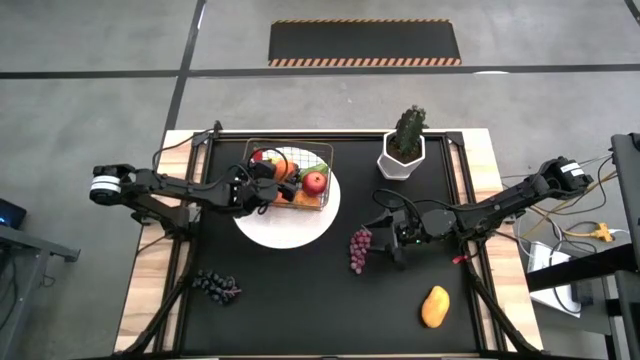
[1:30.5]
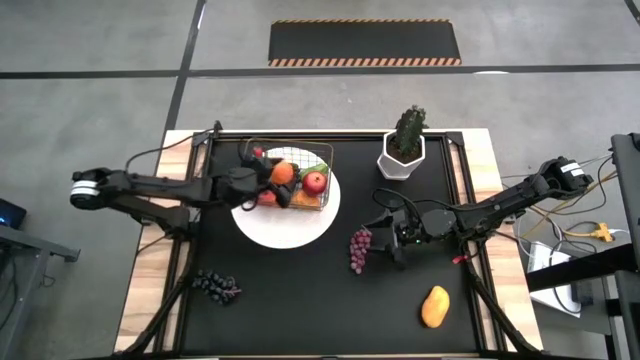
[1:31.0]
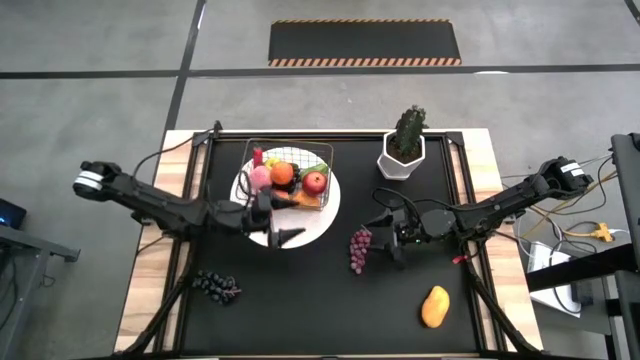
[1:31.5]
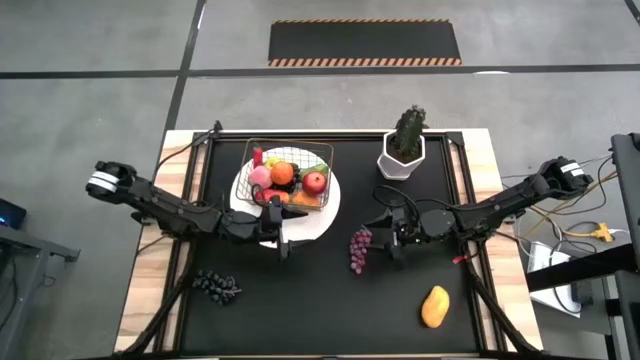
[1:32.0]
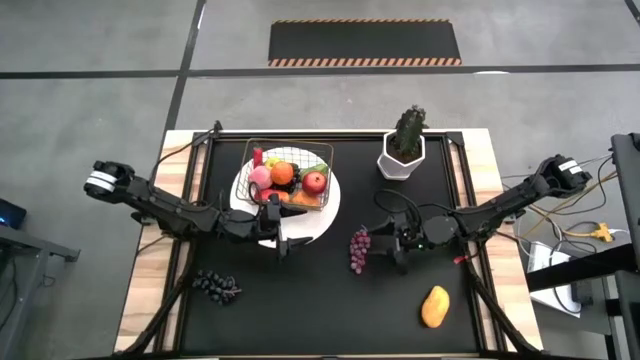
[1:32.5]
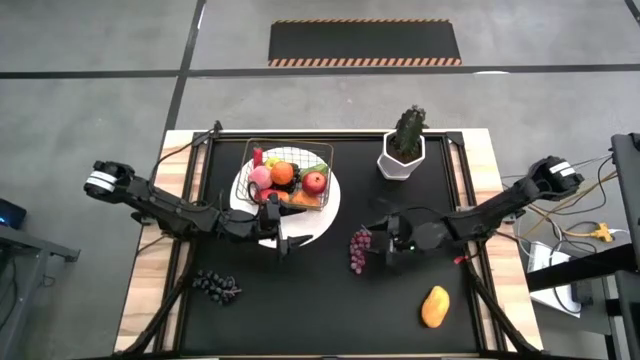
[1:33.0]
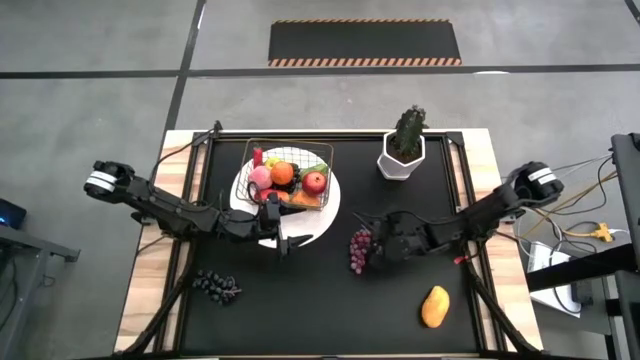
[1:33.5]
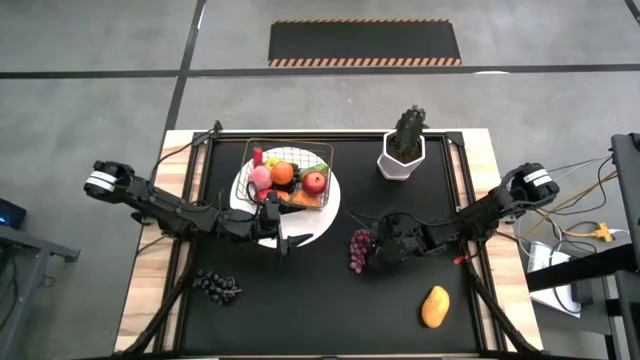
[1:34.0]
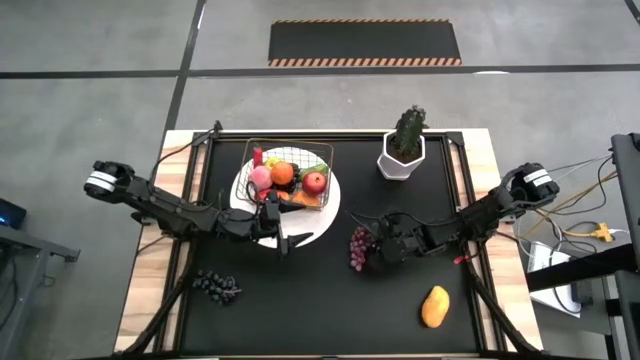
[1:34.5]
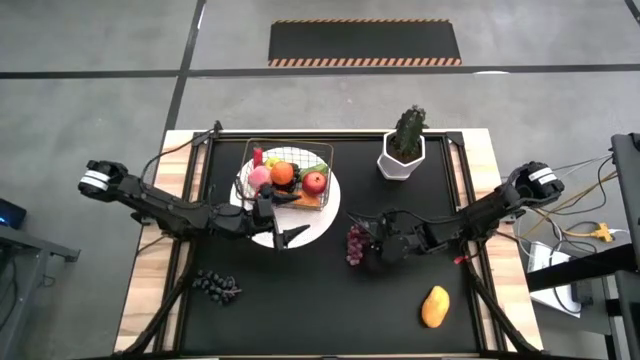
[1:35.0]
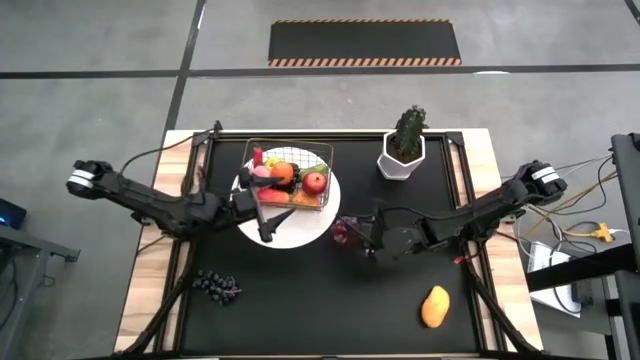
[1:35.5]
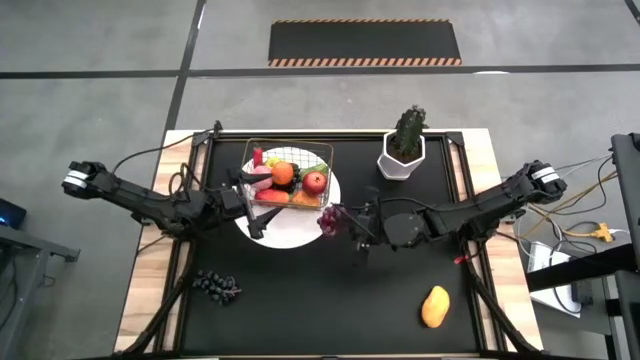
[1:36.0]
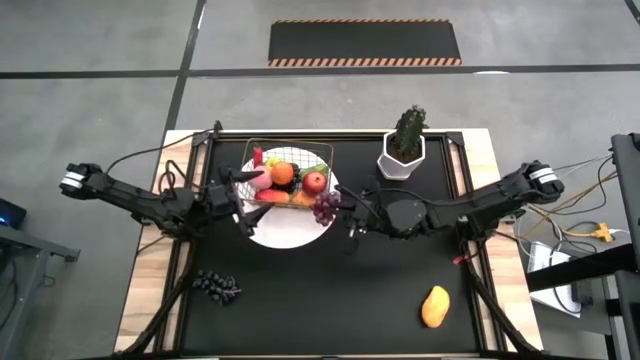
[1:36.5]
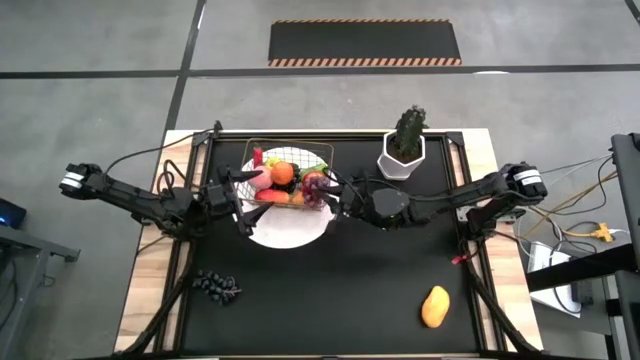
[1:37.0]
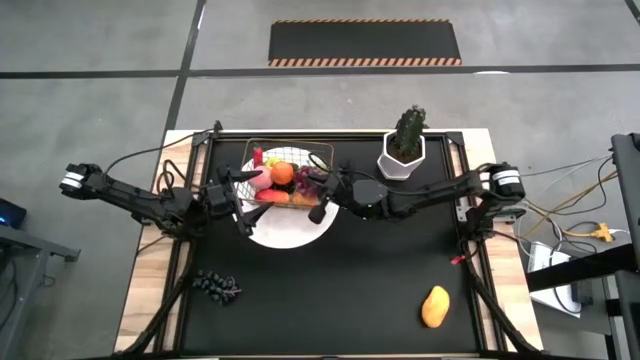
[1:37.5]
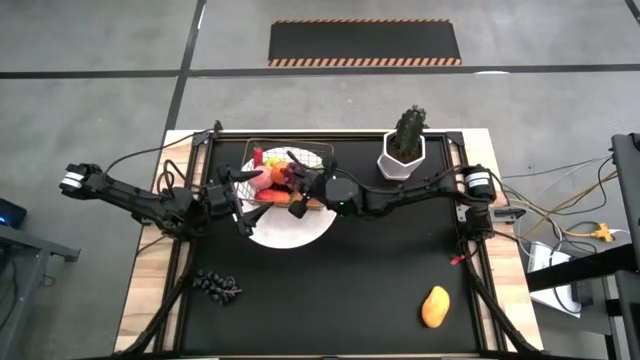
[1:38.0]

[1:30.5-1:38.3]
Task: Build produce basket
Put the red grapes in the gold wire basket

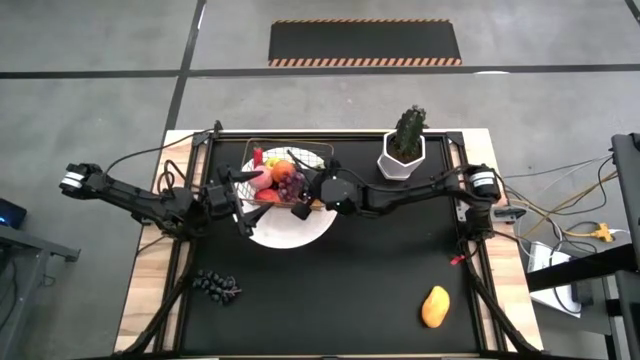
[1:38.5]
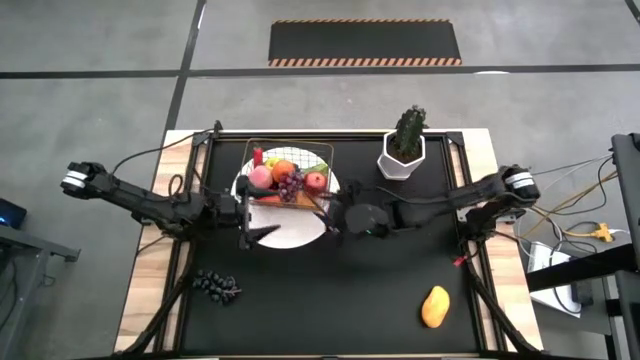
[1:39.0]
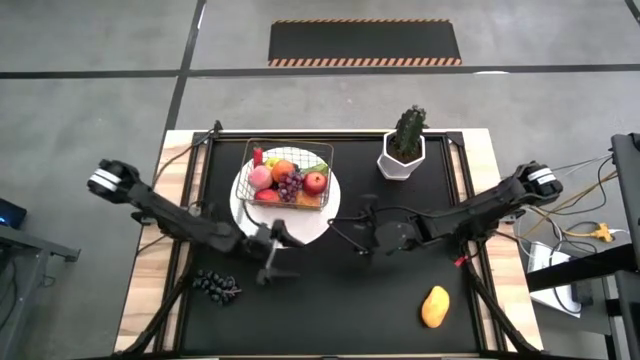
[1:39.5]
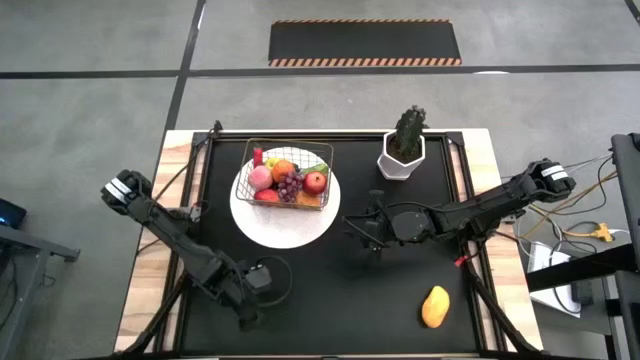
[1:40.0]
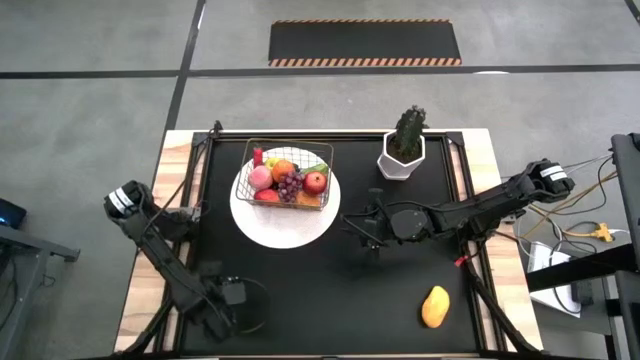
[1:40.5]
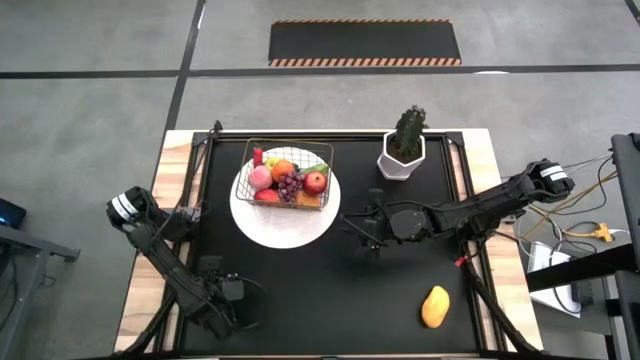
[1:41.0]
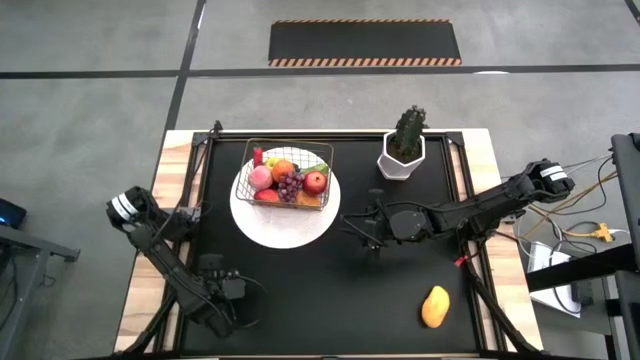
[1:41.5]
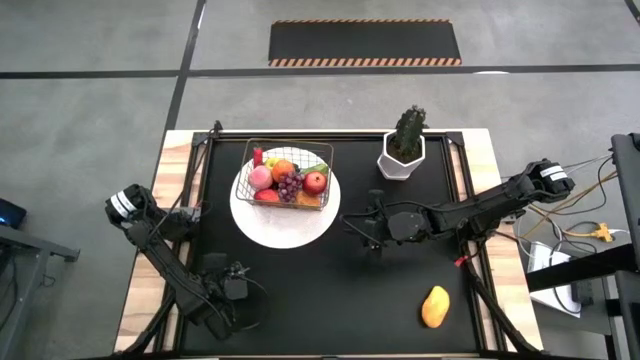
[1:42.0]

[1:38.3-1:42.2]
Put the black grapes in the gold wire basket

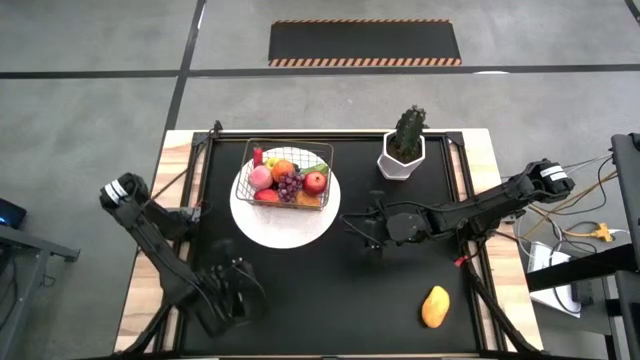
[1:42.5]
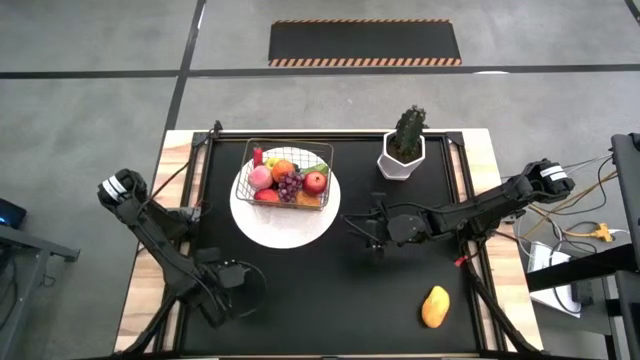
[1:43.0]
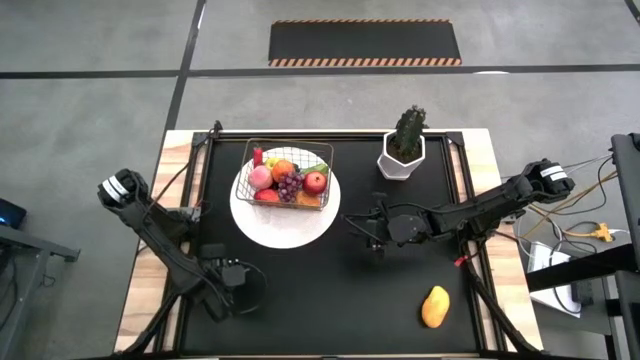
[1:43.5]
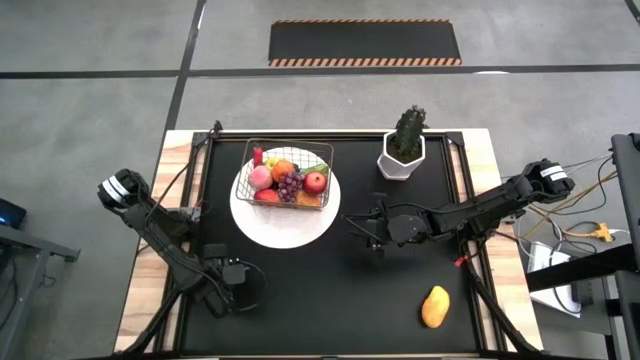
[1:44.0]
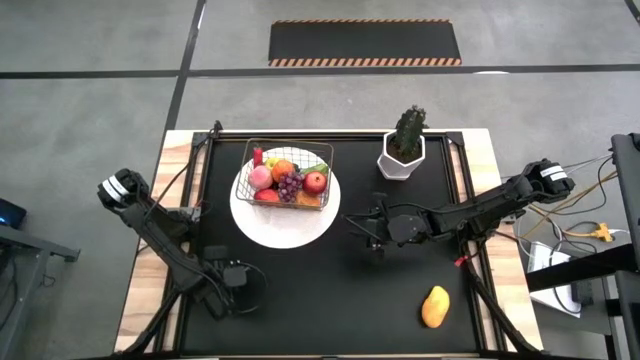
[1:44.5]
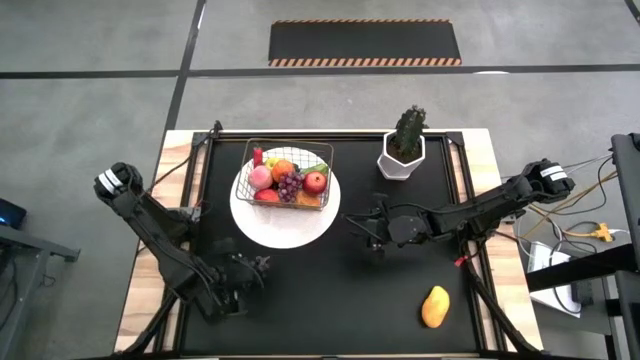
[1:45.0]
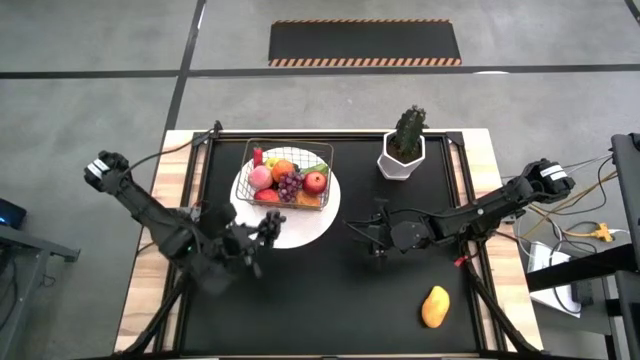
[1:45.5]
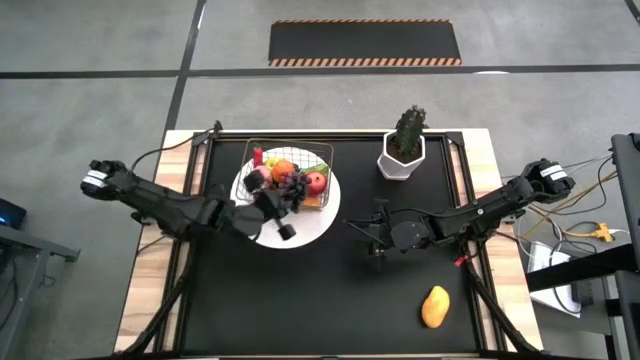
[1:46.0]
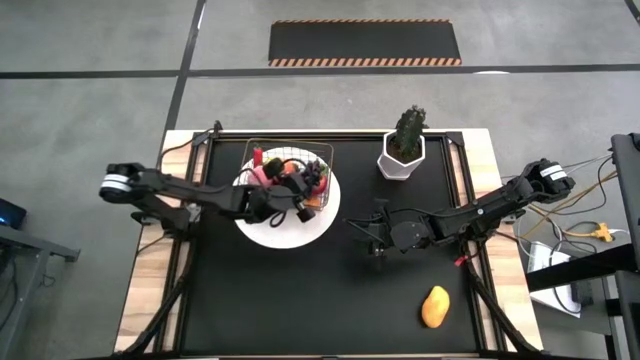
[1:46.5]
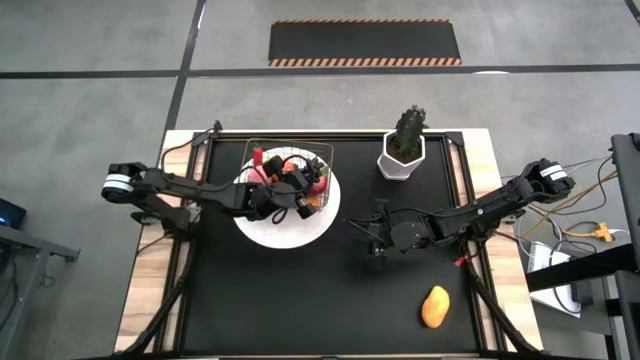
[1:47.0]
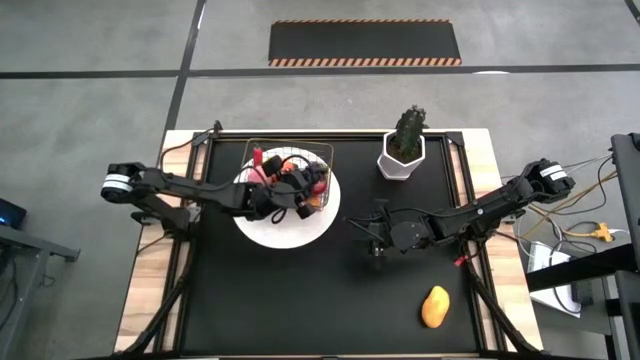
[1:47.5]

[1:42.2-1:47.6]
Put the black grapes in the gold wire basket

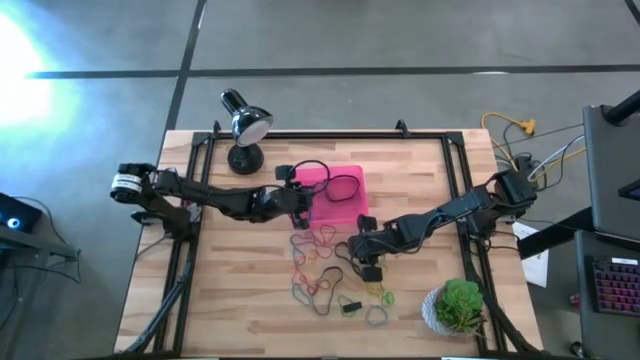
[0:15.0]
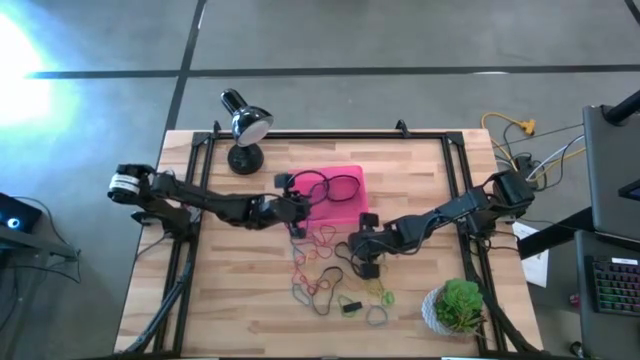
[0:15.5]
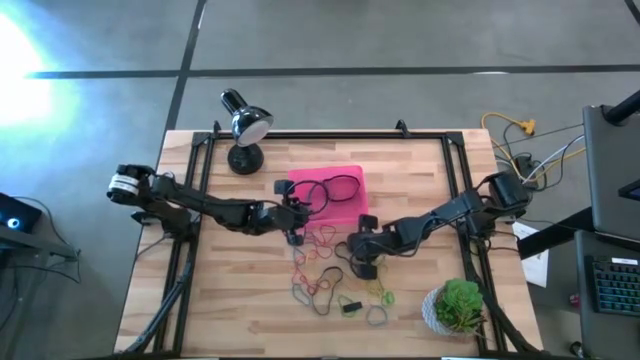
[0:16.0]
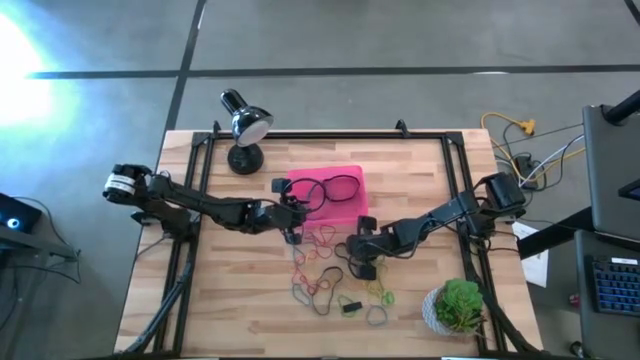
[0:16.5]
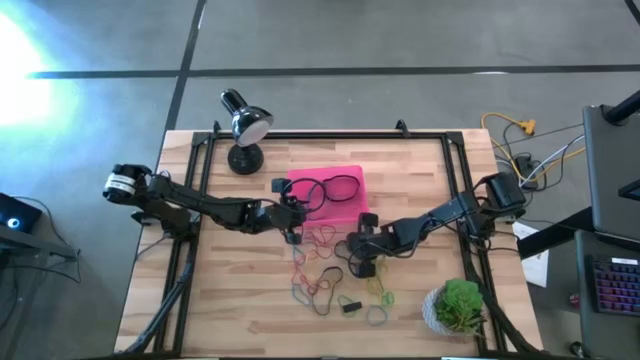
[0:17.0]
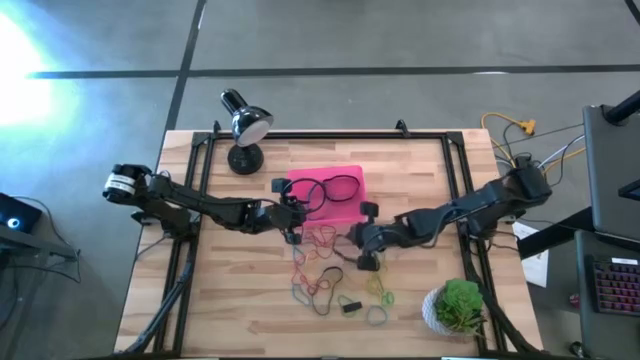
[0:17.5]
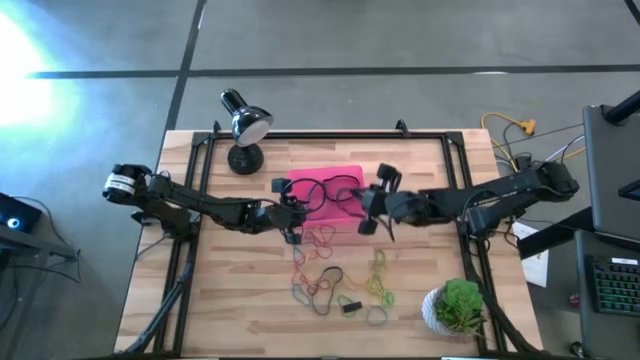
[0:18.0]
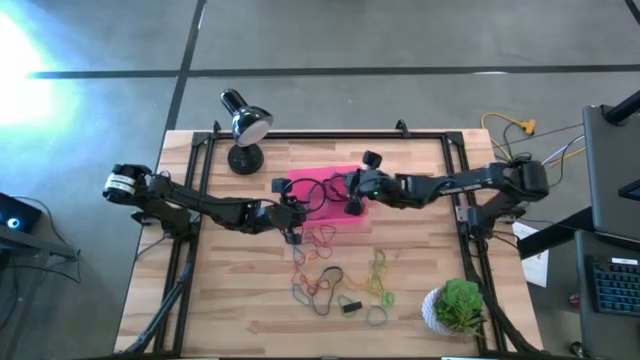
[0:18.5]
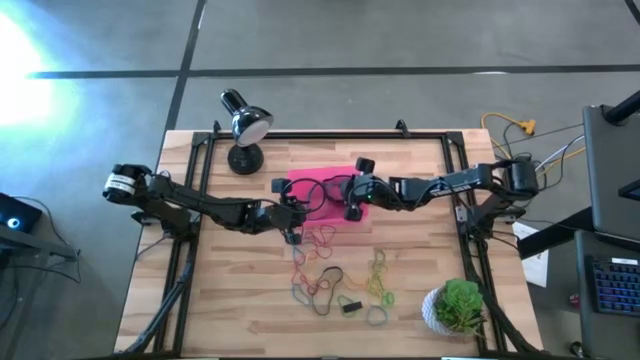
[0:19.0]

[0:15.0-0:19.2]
Task: Pick and place rubber bands into bin
Put the black rubber band into the red bin
